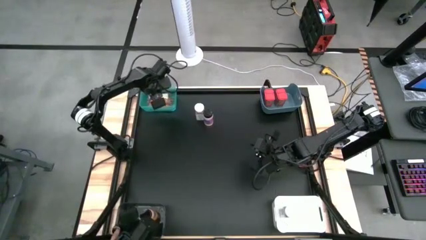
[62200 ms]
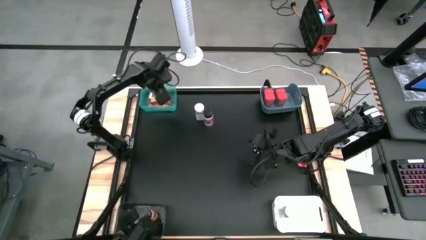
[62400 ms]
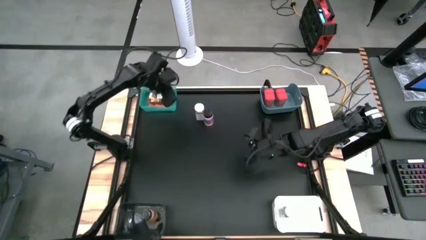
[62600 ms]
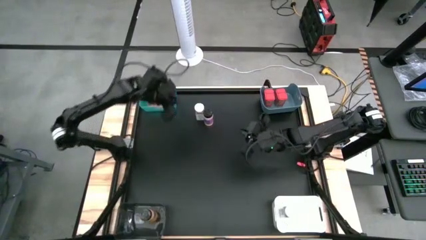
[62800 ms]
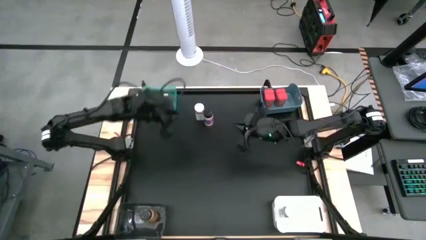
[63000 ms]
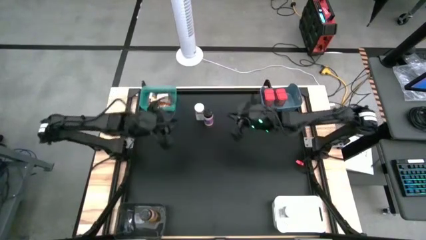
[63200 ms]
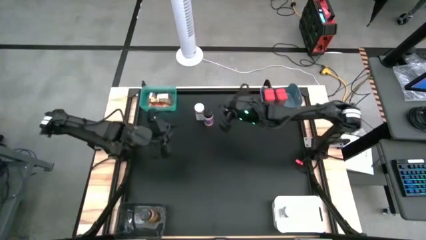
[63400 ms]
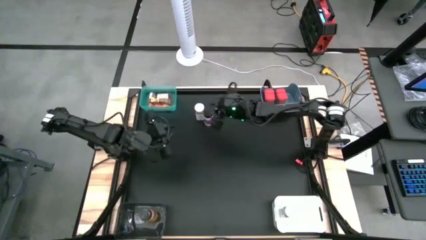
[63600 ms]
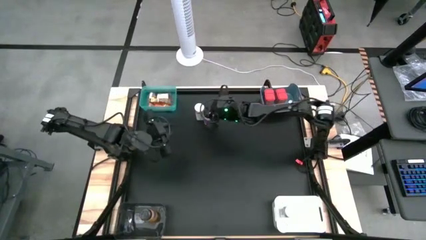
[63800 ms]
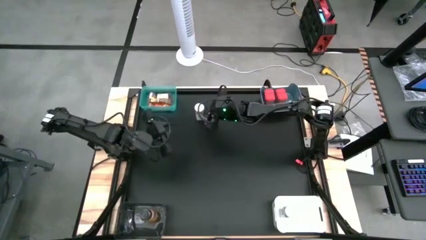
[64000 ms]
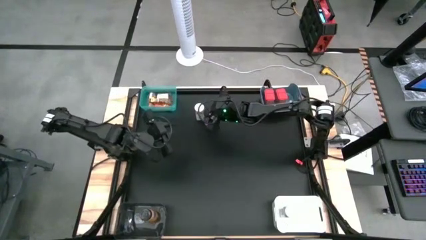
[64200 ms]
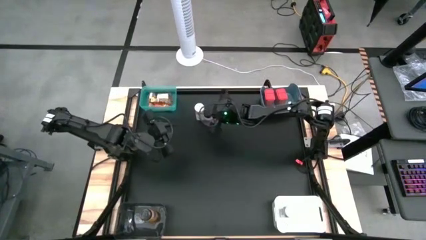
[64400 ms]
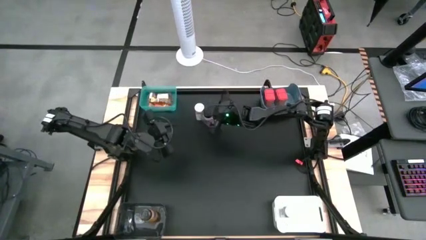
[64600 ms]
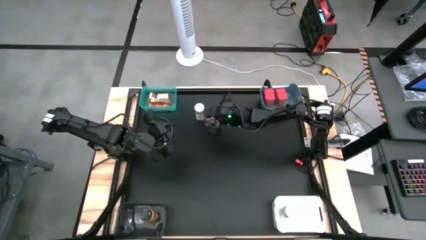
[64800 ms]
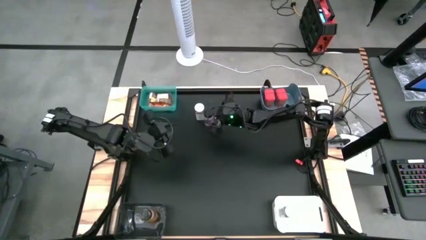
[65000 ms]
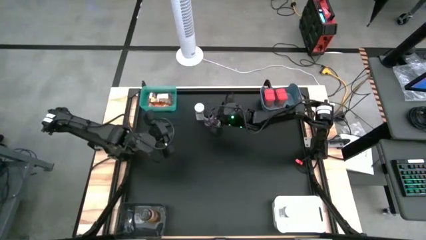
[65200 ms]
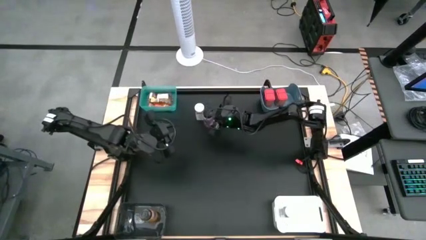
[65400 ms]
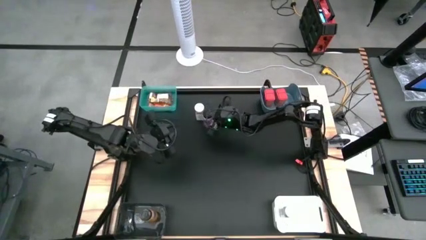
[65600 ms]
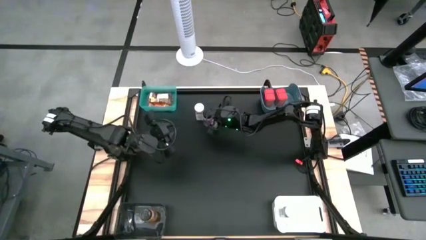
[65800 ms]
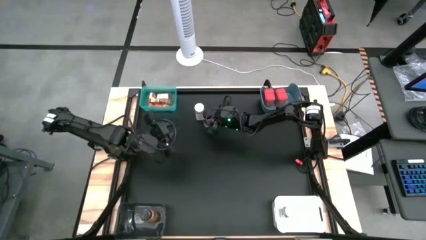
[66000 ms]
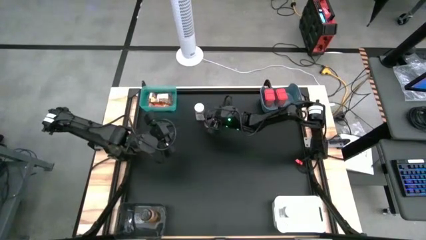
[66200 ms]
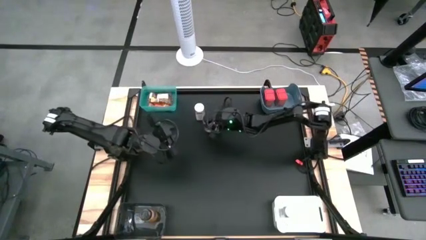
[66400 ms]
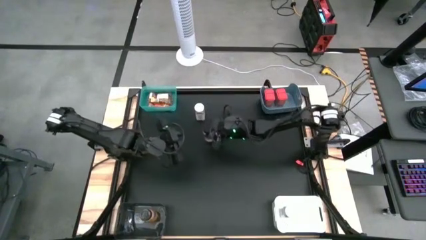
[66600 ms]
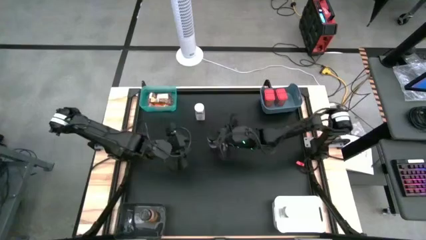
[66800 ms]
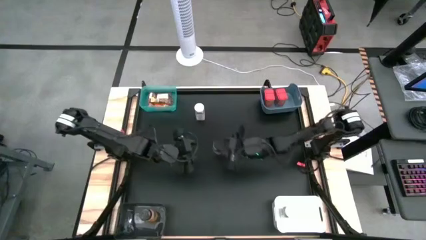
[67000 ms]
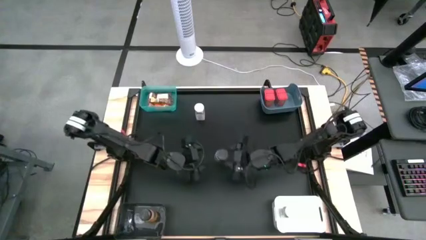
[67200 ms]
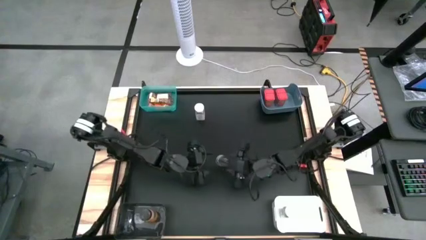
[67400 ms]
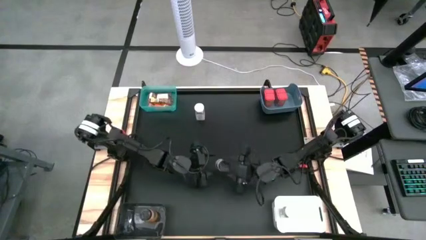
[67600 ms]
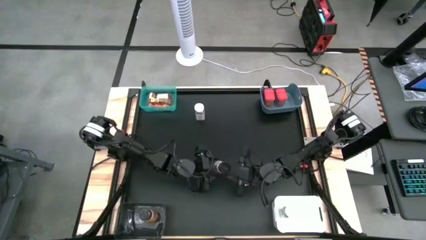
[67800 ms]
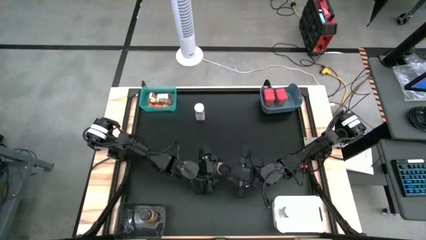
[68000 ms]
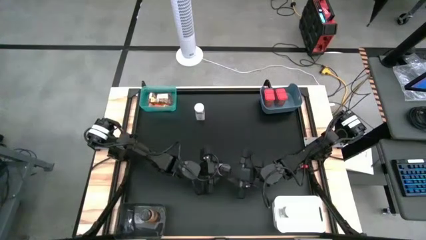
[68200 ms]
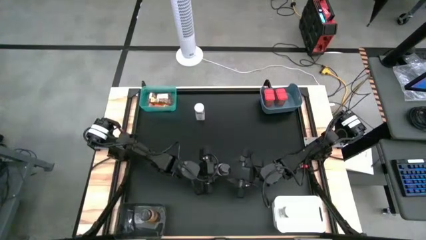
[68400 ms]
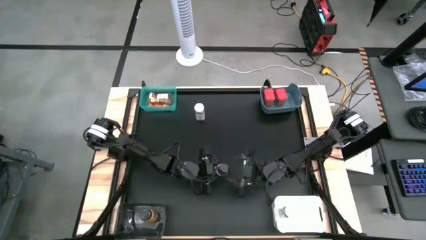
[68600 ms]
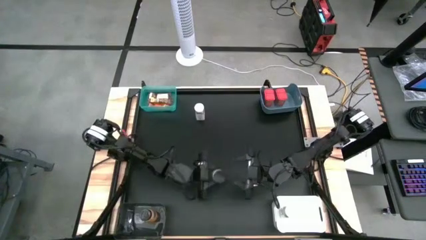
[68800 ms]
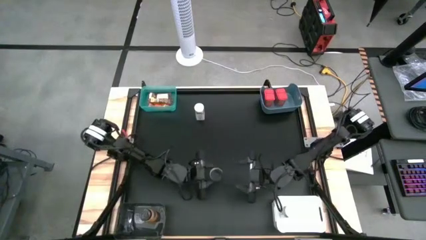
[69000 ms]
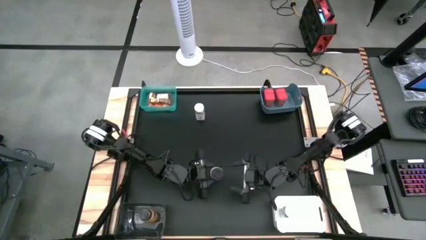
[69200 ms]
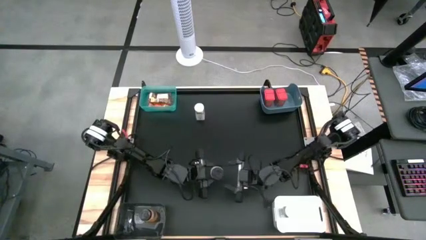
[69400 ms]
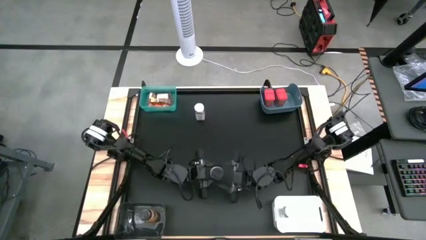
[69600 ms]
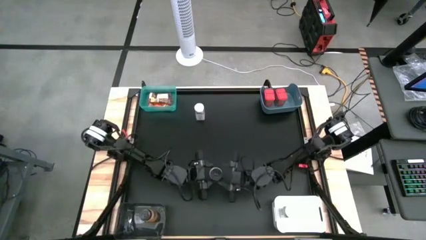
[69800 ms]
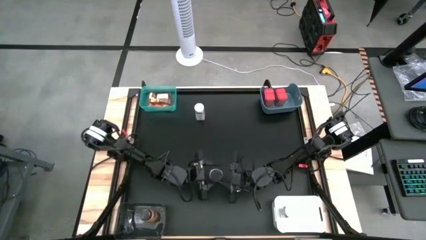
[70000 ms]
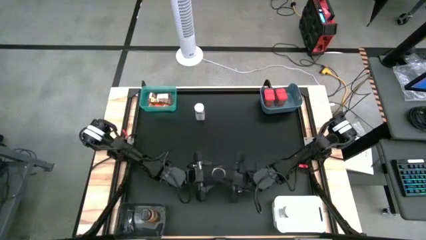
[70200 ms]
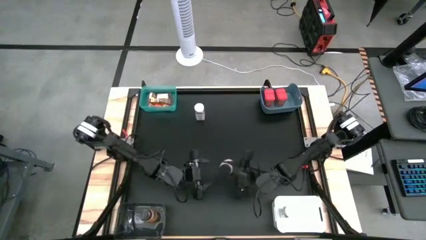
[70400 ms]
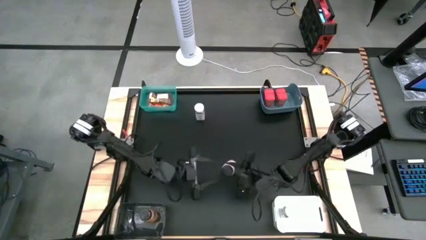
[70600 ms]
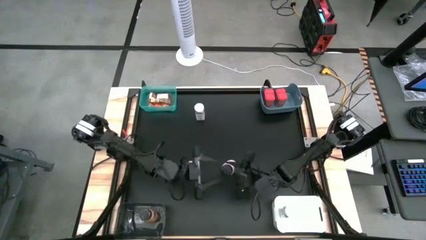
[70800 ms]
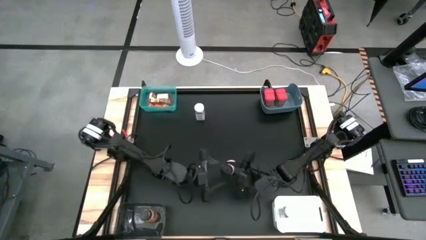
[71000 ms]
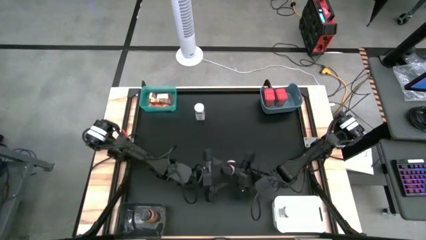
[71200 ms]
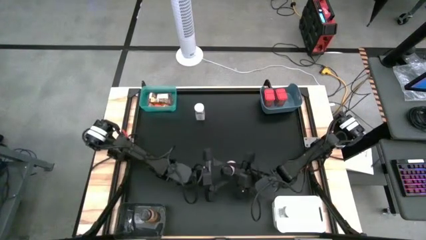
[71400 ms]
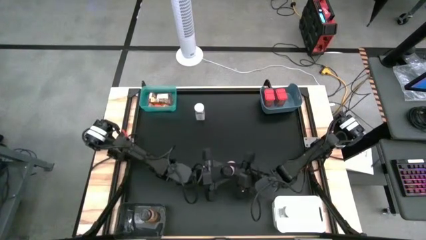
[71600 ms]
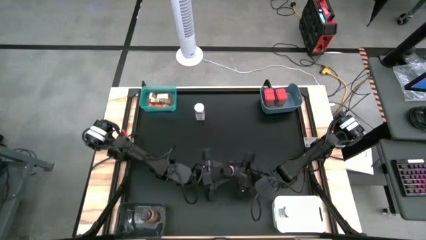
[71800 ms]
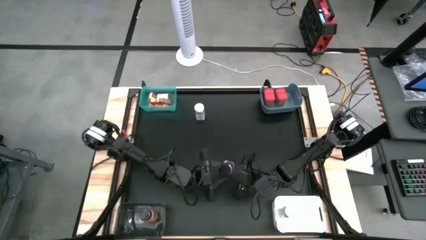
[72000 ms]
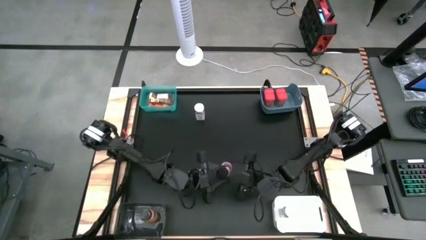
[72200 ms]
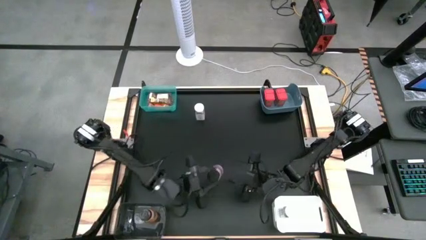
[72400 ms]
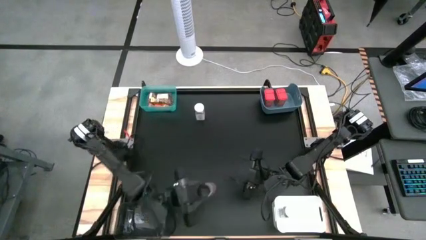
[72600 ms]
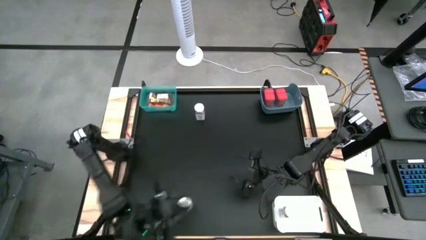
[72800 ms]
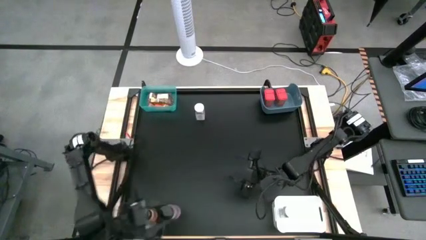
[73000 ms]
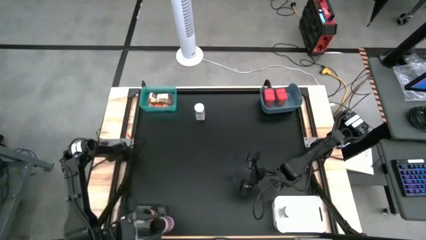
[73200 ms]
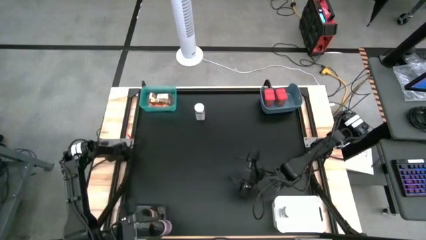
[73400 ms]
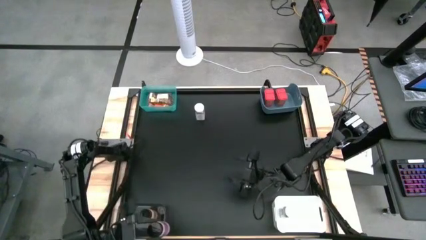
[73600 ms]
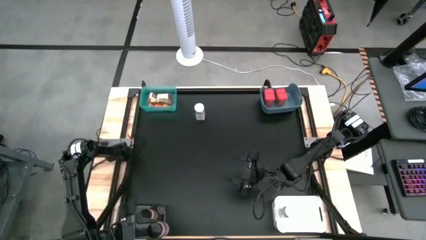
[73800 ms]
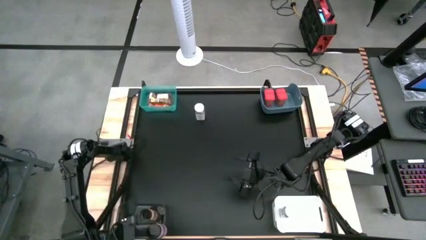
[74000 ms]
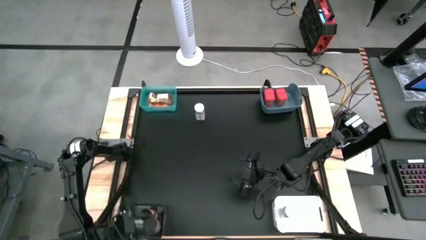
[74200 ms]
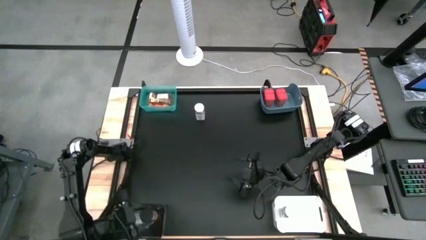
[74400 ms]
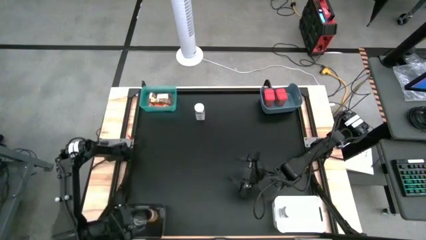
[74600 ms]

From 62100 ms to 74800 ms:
Task: Sort spices by type
Put the black seasoning bottle into the black bin
